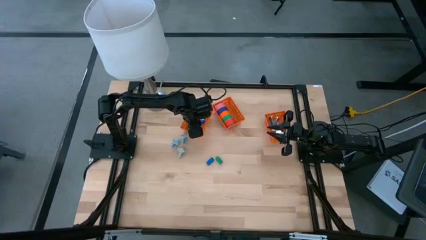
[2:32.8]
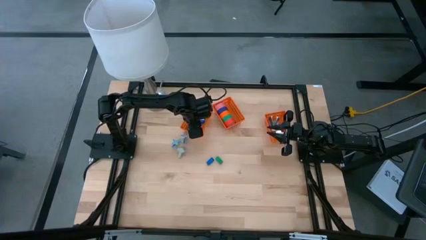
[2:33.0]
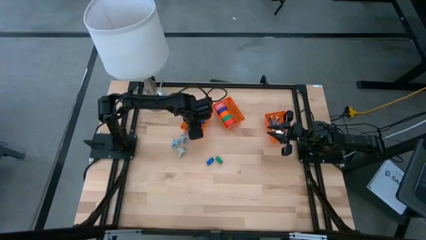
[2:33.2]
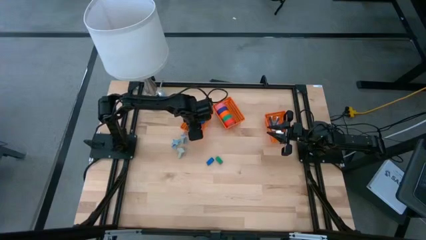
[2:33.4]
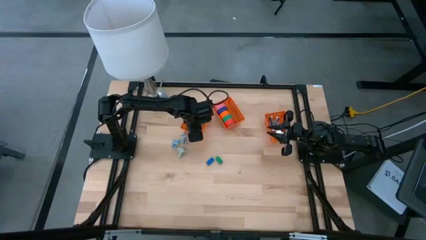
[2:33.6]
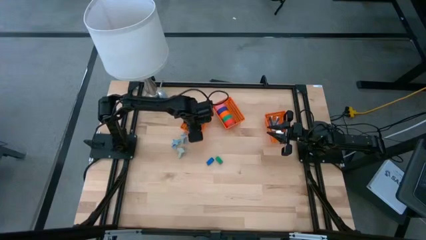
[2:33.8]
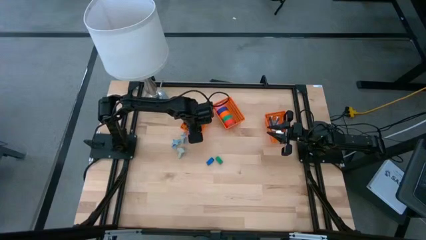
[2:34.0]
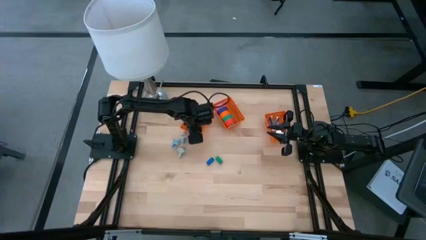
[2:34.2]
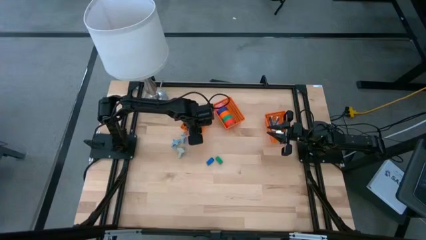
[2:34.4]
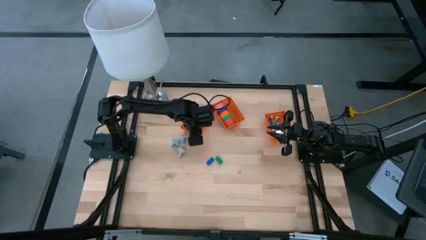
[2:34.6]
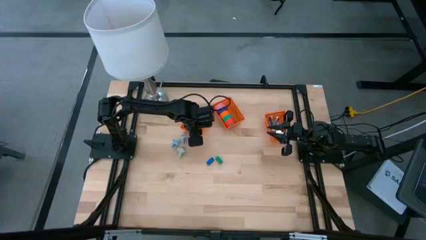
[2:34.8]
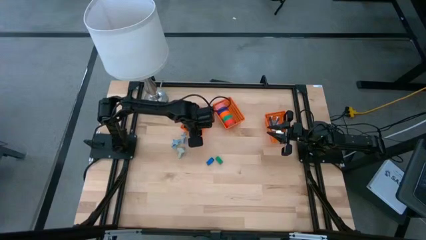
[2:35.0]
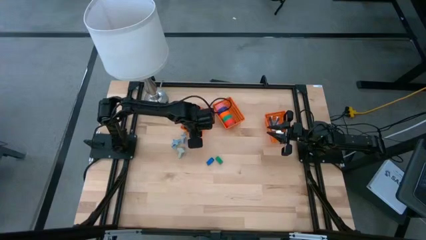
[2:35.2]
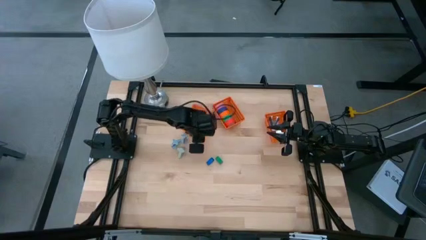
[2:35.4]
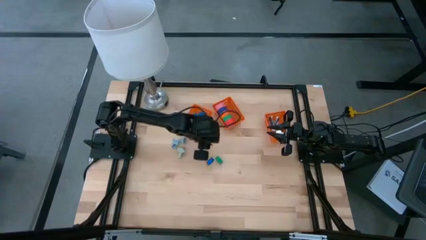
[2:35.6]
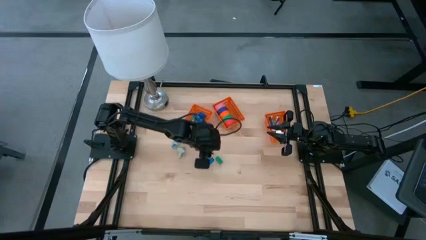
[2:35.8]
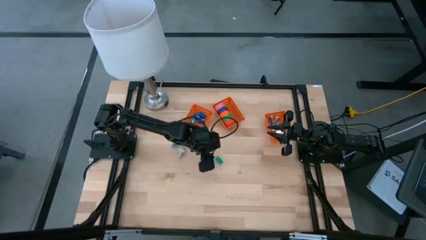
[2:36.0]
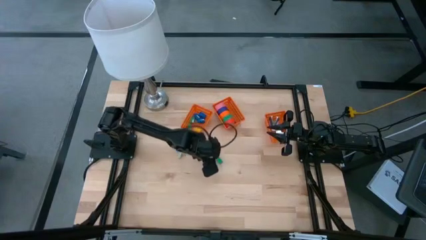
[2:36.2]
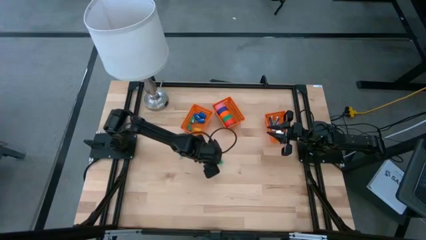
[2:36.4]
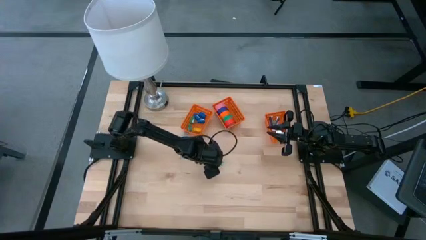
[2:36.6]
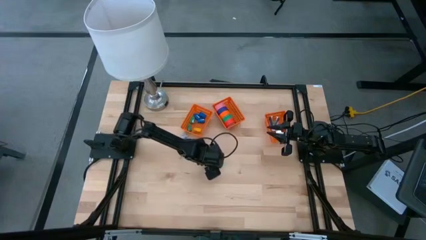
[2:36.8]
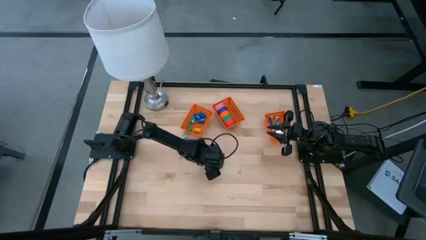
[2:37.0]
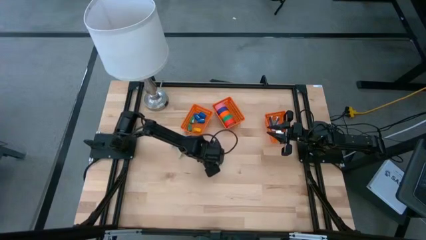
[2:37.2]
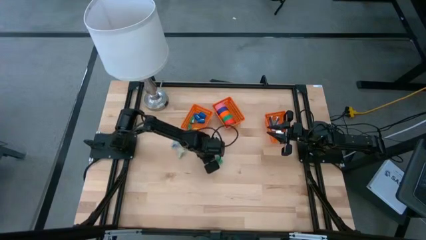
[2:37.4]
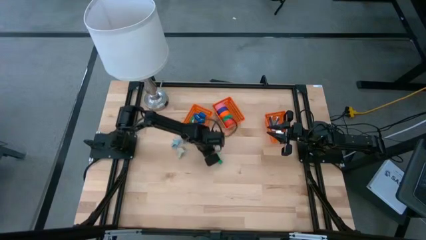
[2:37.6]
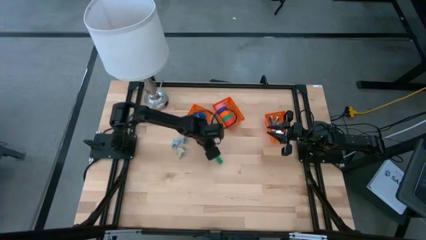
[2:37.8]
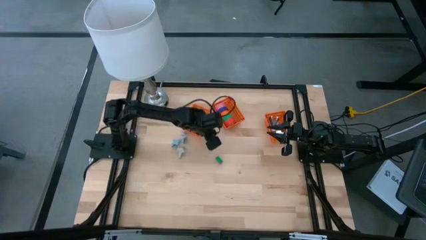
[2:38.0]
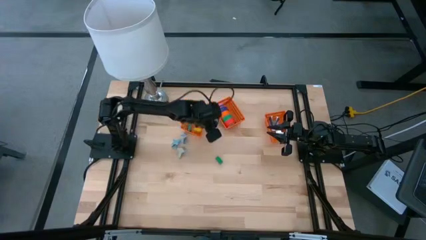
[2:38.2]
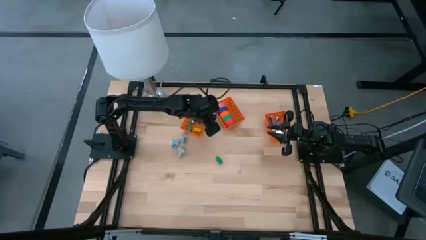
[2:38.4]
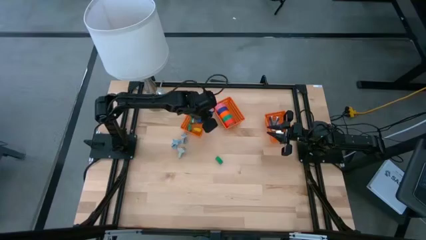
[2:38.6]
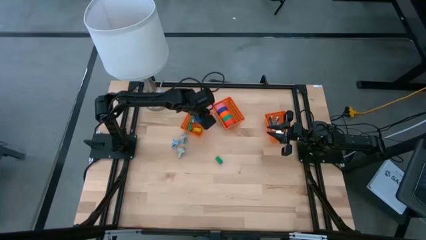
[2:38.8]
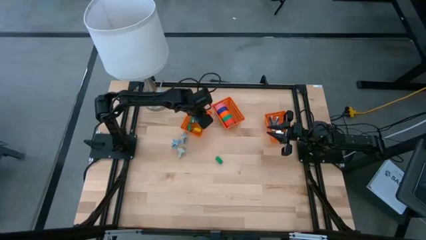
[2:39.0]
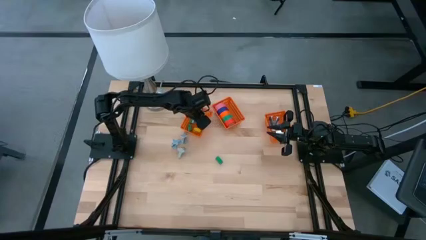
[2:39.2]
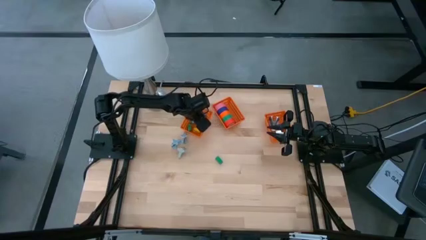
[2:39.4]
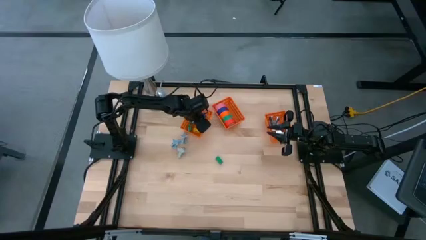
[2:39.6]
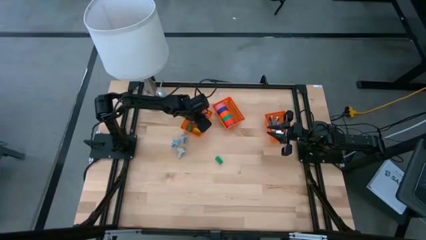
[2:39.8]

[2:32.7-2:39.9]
Task: Pick and place Stapler, Stapler remover, tape
Put the blue stapler into the left orange bin

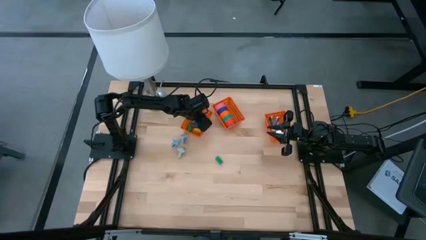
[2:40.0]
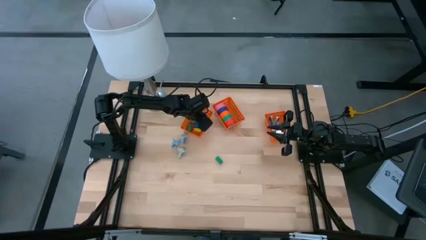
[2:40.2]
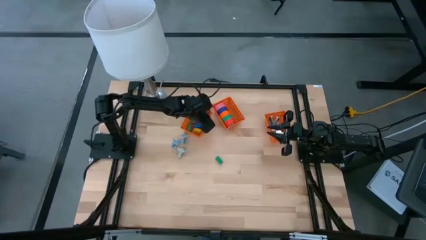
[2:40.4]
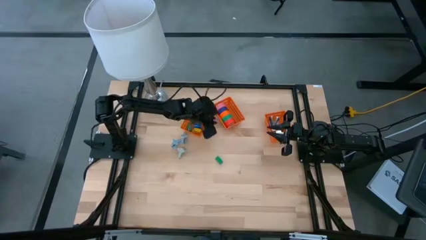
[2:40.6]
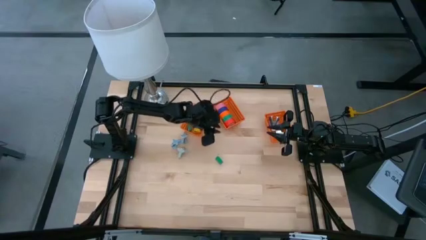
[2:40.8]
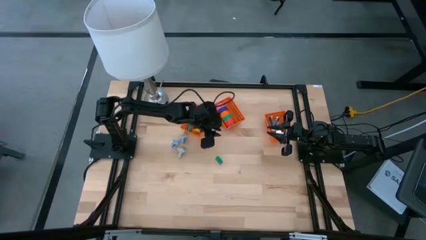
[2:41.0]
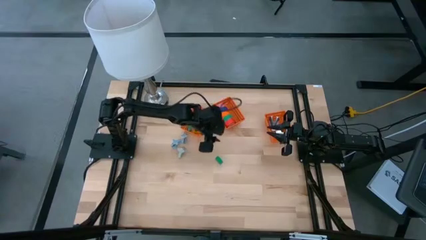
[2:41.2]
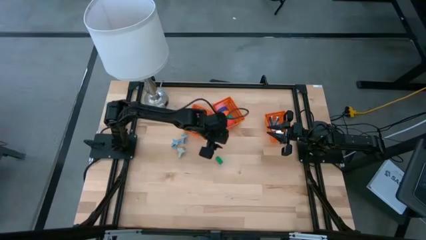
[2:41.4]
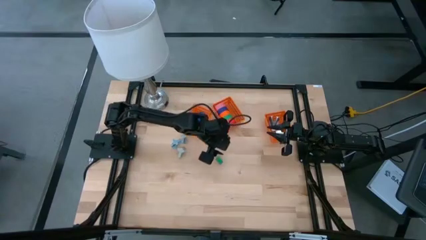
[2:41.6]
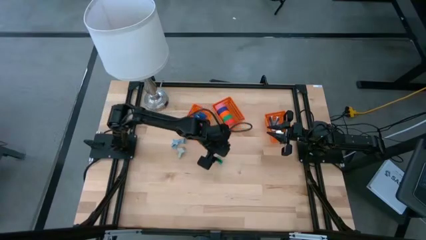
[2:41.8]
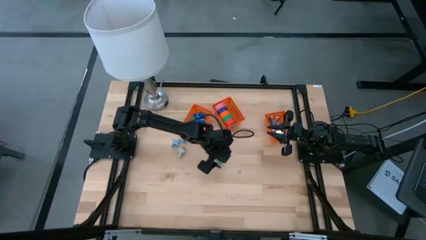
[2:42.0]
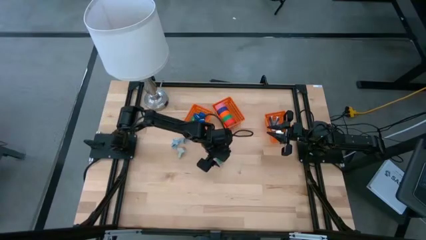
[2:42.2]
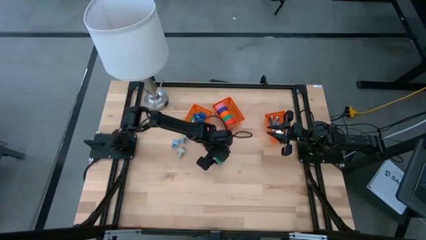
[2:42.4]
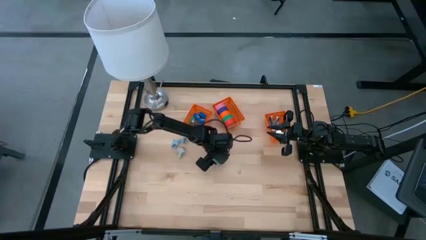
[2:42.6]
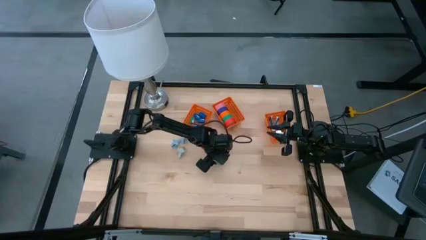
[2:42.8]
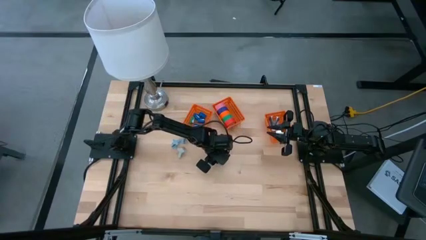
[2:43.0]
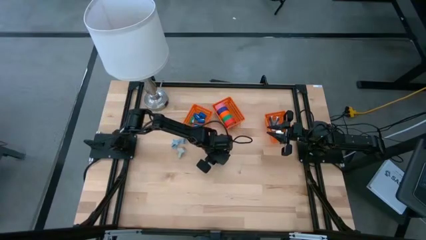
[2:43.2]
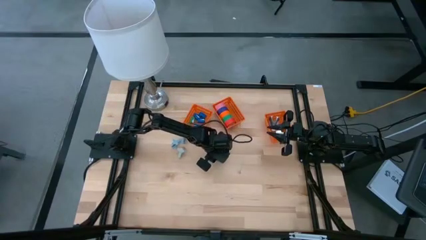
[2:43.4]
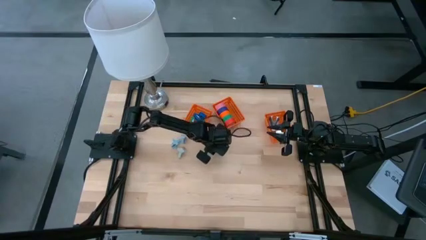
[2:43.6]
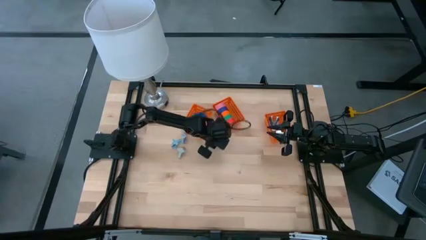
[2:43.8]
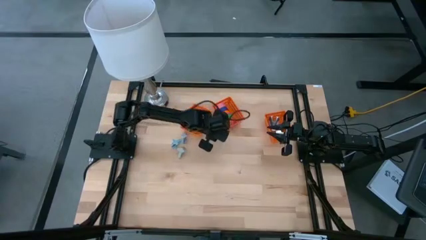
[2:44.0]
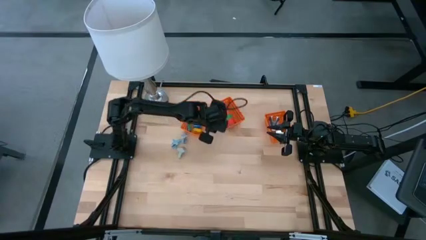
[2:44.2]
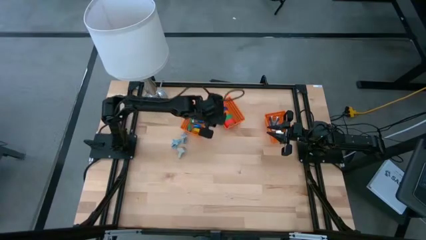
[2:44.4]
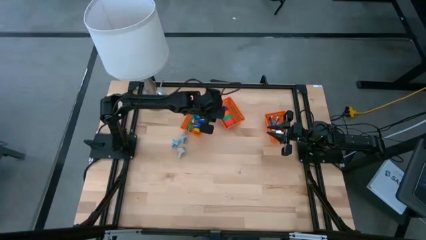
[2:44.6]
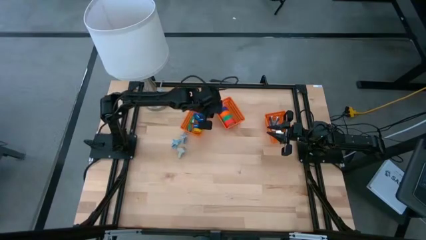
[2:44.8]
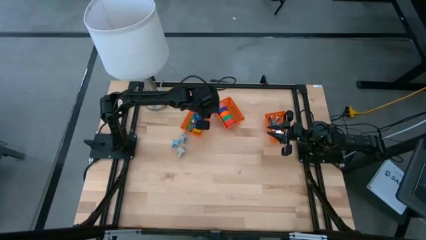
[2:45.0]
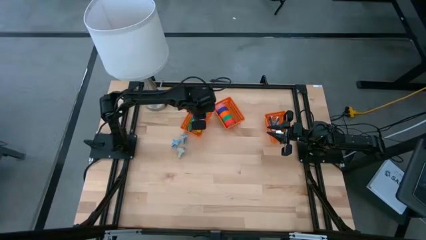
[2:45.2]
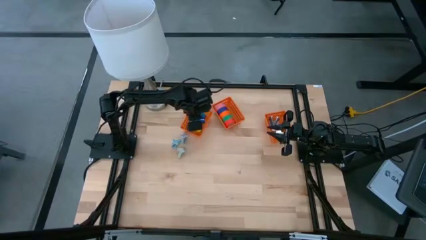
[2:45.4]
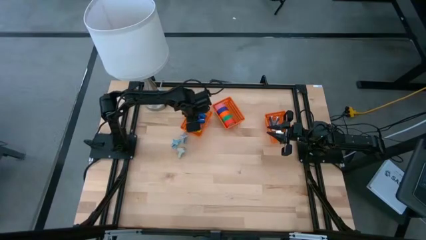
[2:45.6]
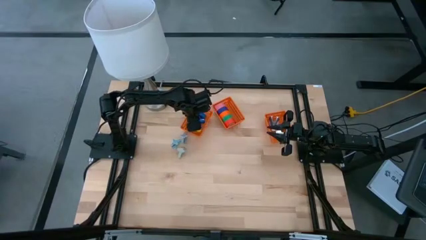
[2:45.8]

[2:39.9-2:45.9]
Put the green stapler into the left orange bin

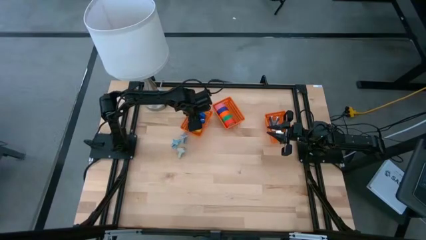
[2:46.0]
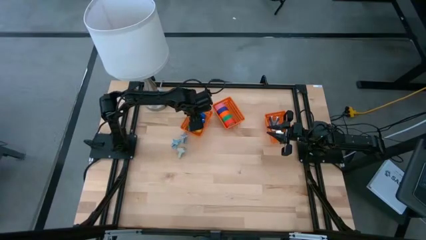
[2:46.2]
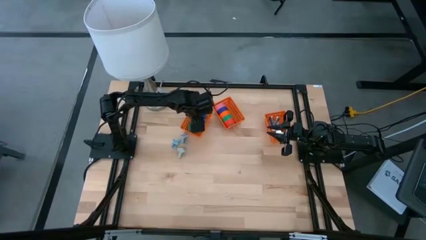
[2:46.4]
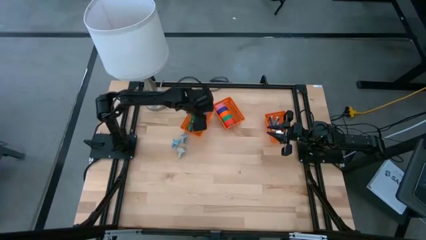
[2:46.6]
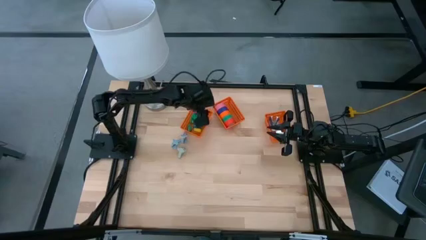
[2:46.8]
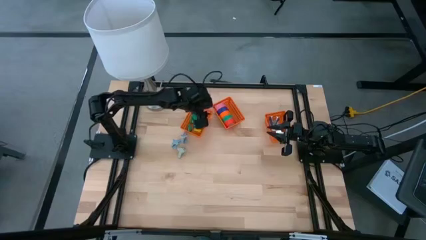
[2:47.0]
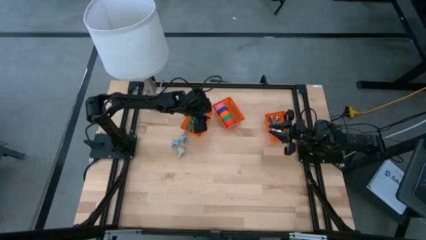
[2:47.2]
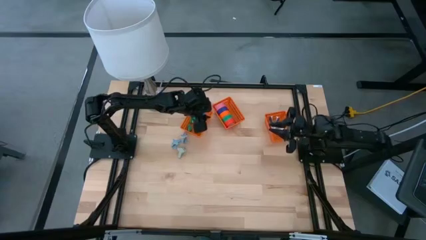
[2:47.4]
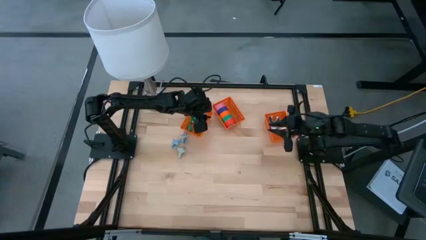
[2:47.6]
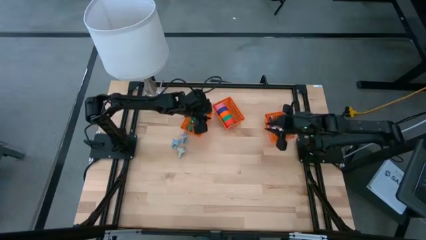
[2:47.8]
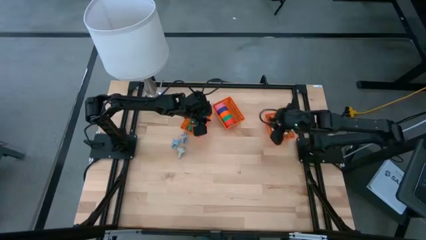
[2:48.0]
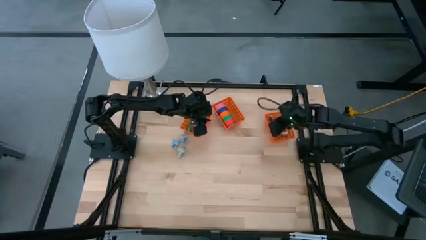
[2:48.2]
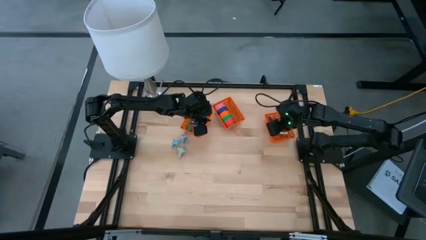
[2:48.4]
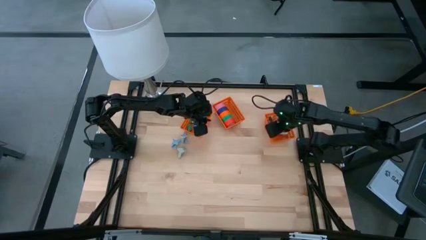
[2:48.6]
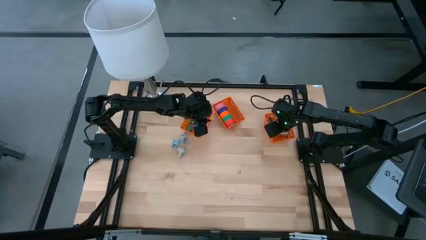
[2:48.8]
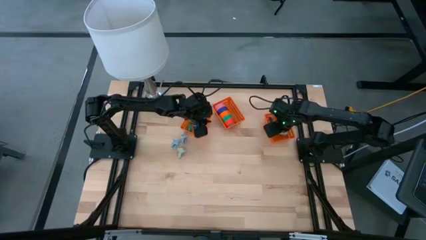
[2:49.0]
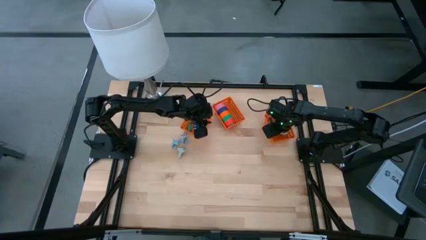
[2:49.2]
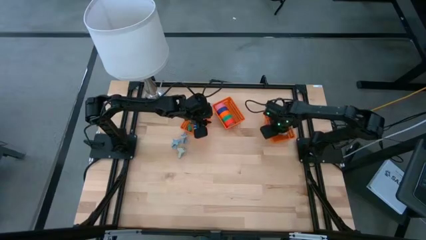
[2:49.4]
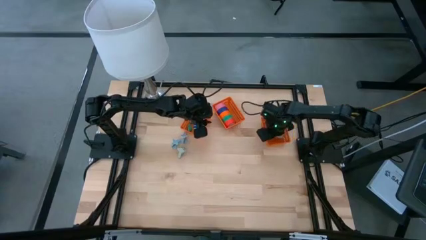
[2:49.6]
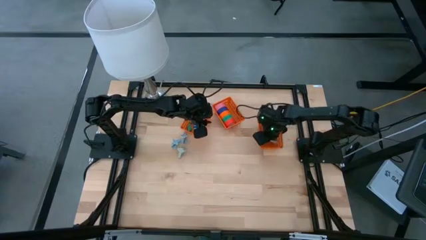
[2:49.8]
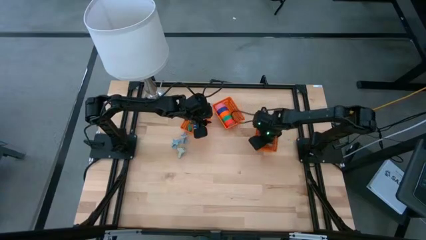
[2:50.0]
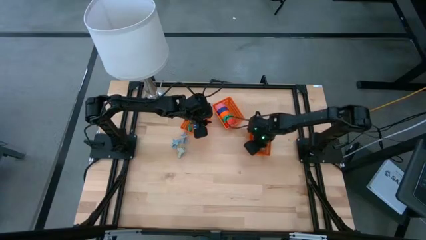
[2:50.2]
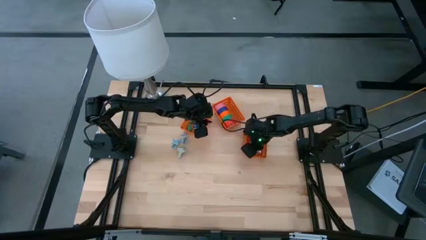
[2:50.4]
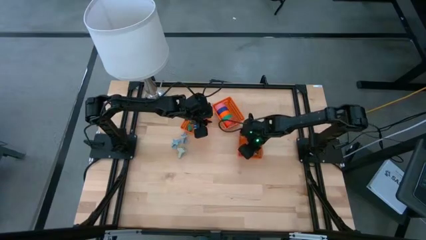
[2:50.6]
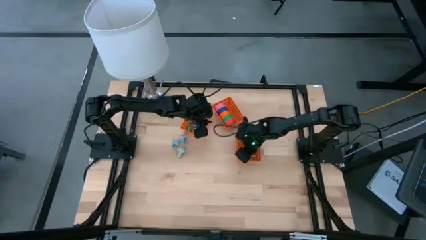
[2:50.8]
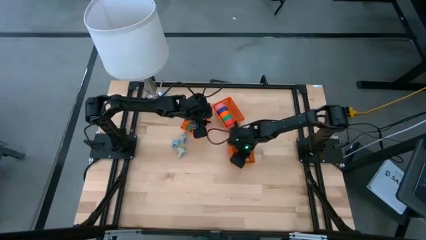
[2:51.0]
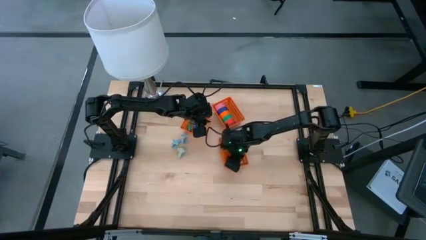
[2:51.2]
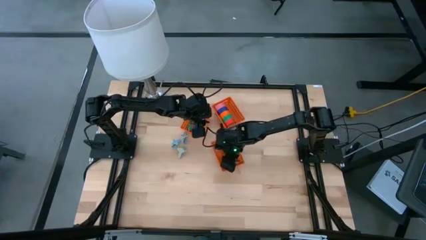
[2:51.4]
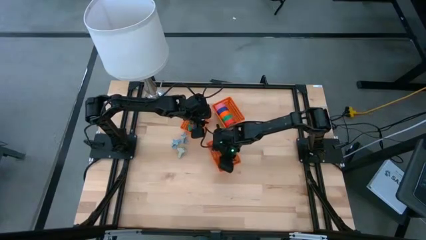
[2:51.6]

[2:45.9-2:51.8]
Move right orange bin to the center of the table
